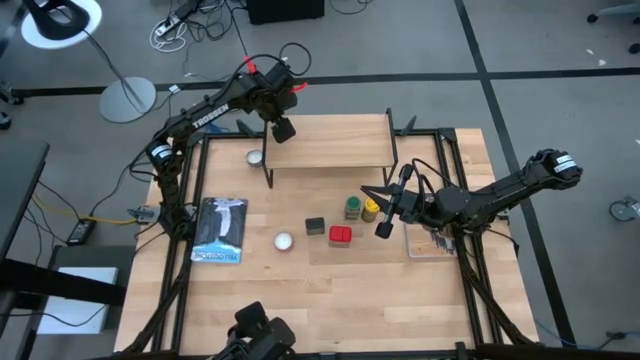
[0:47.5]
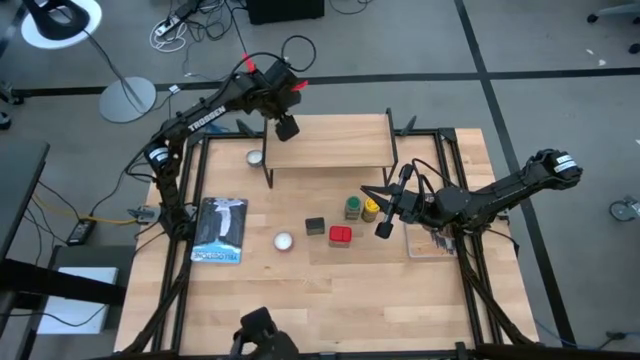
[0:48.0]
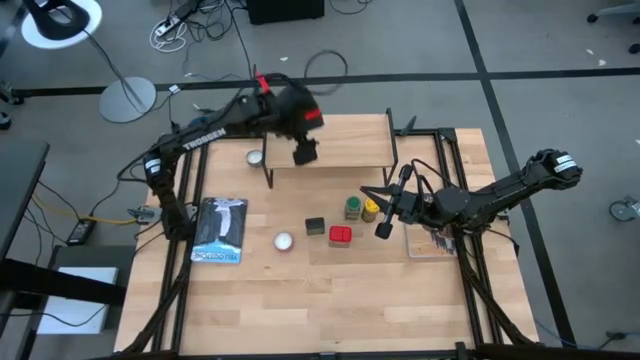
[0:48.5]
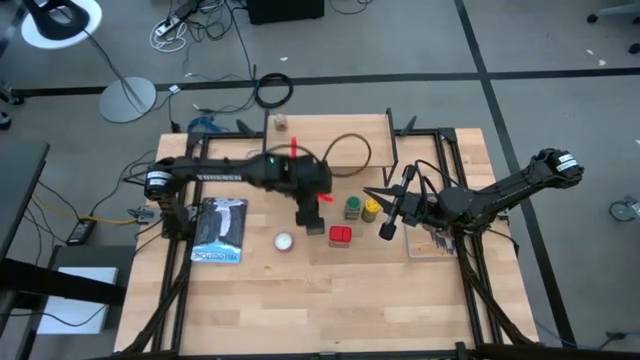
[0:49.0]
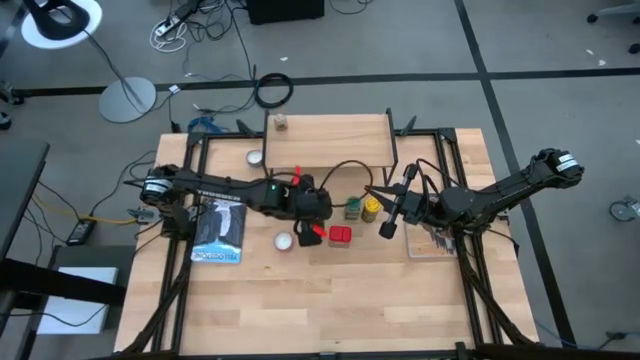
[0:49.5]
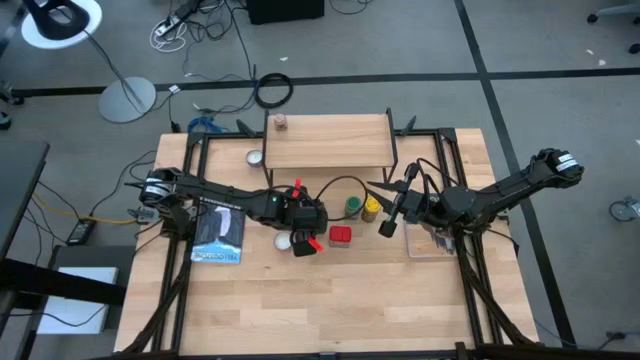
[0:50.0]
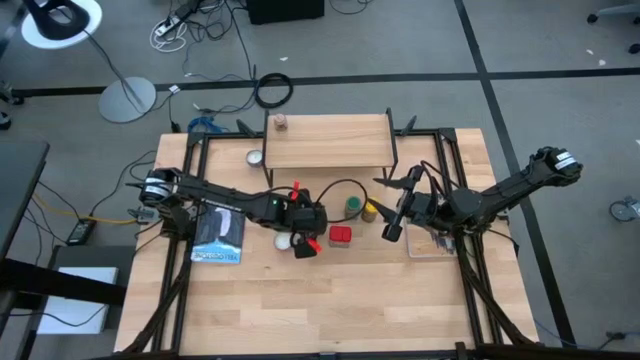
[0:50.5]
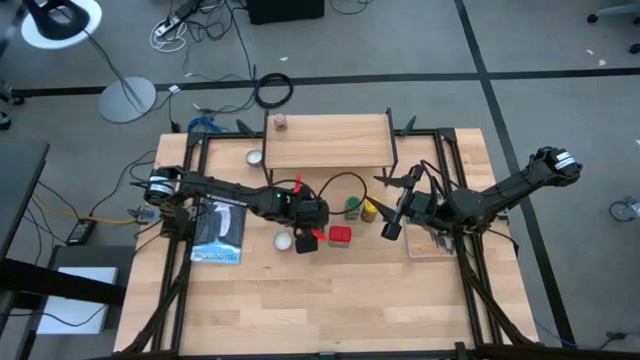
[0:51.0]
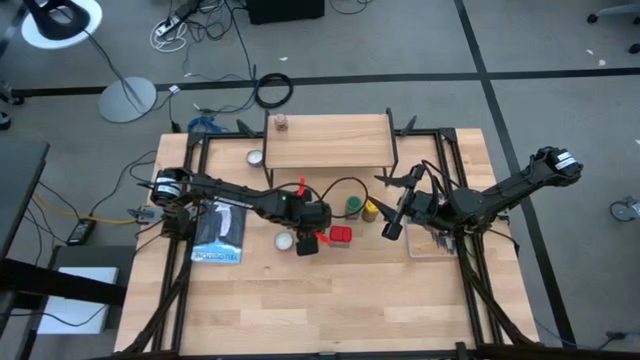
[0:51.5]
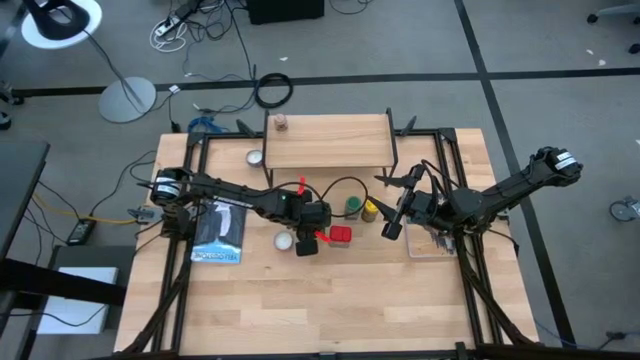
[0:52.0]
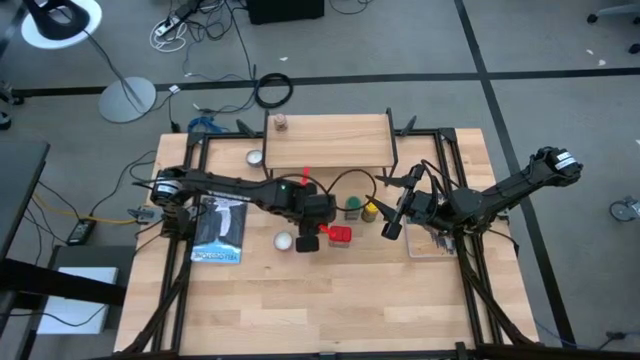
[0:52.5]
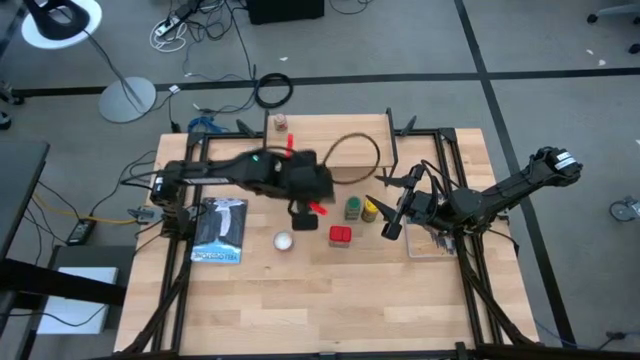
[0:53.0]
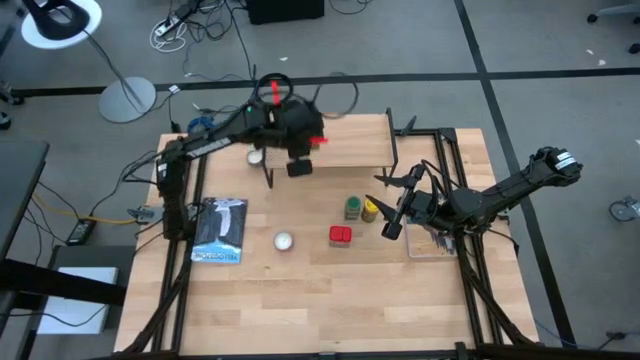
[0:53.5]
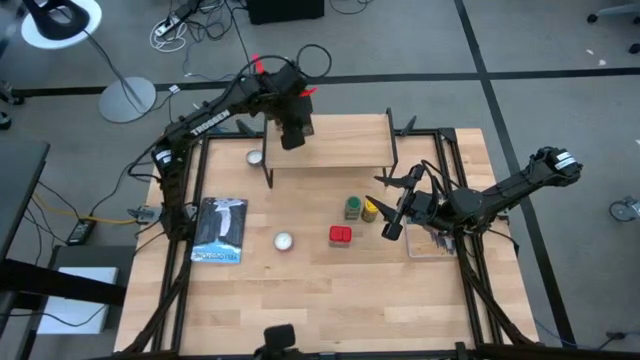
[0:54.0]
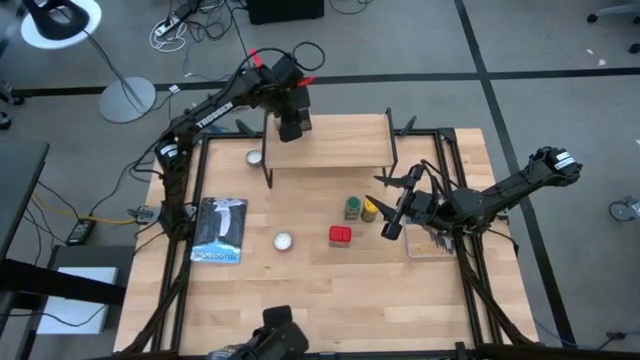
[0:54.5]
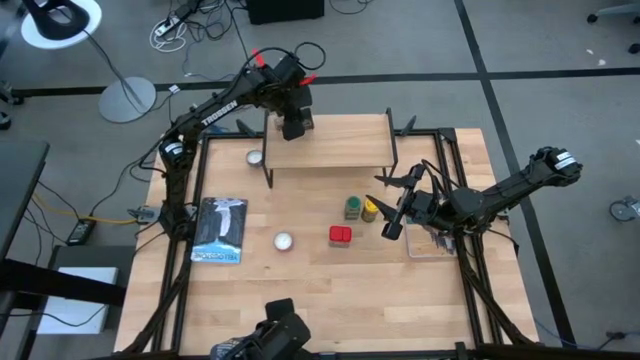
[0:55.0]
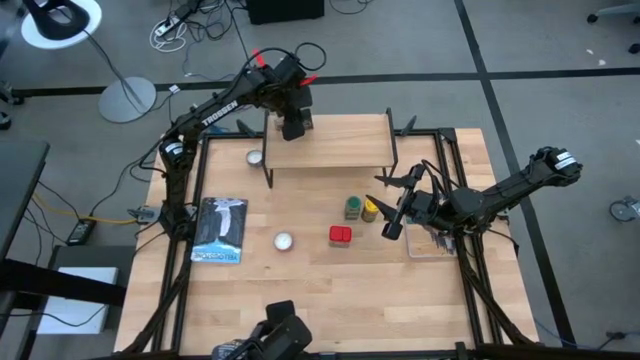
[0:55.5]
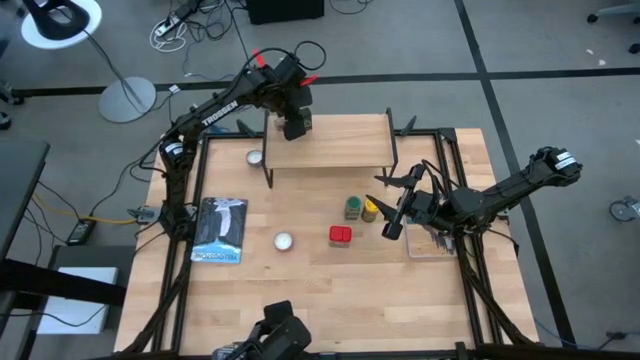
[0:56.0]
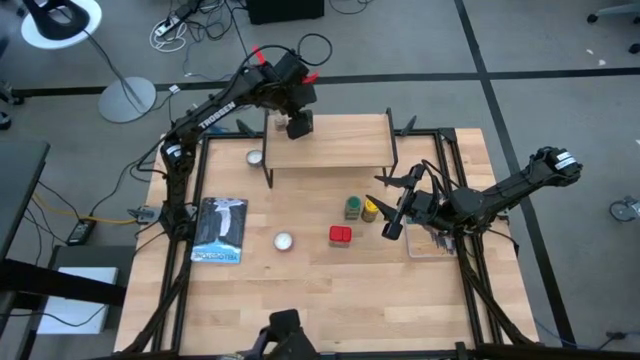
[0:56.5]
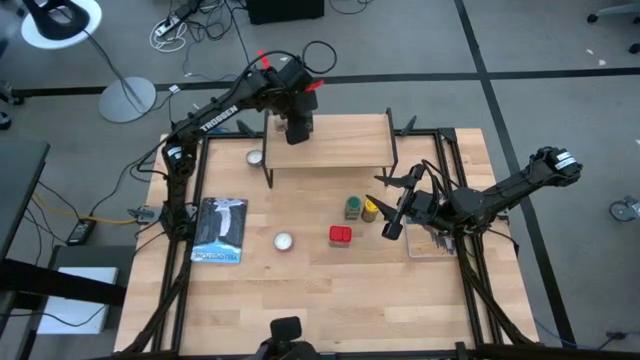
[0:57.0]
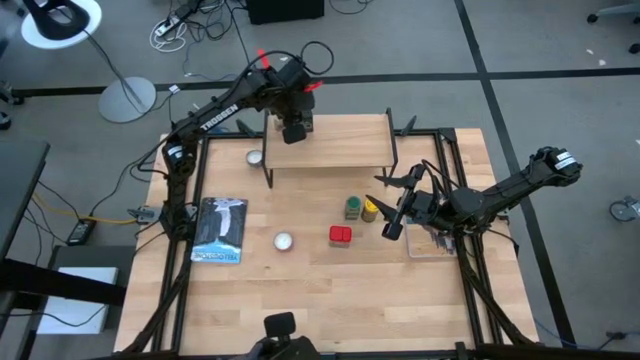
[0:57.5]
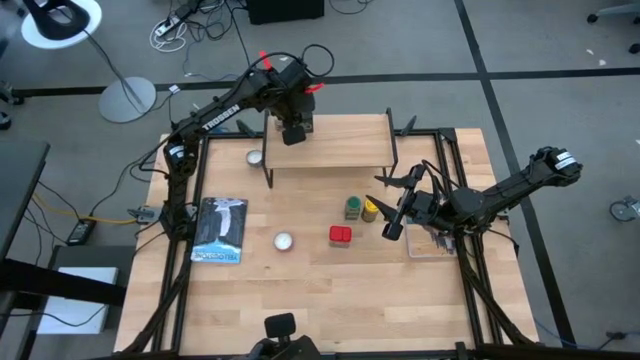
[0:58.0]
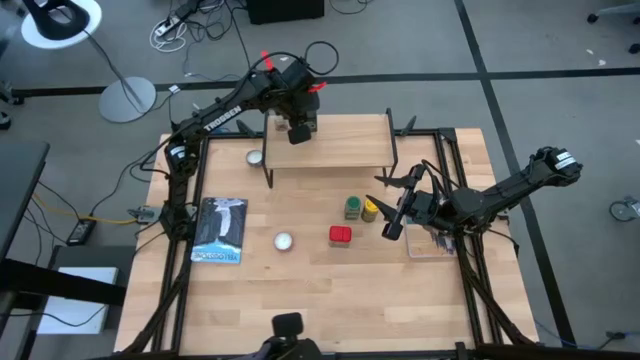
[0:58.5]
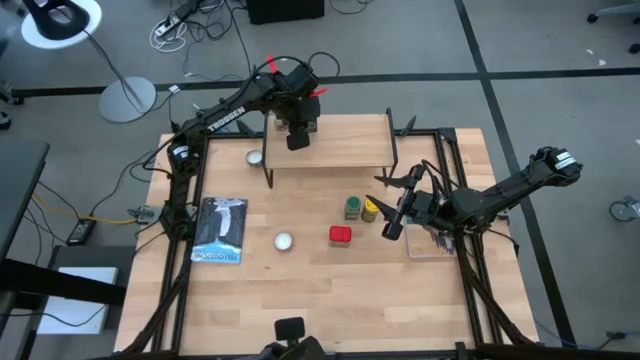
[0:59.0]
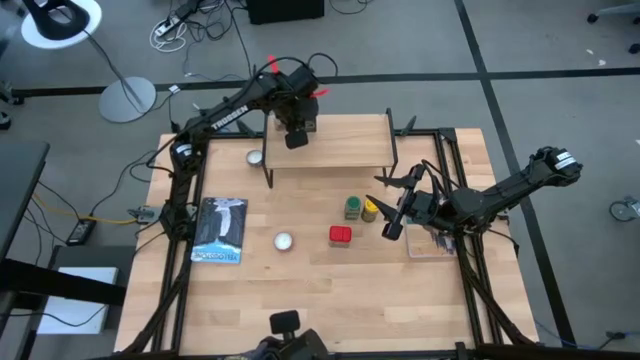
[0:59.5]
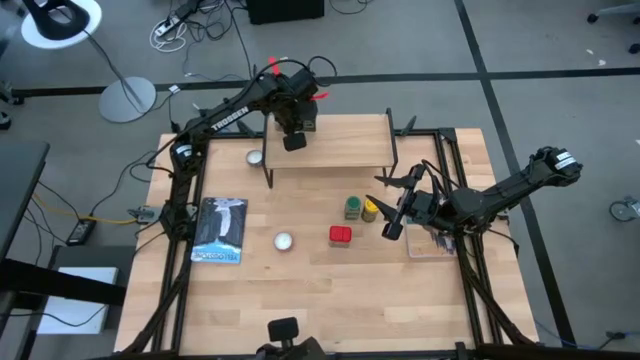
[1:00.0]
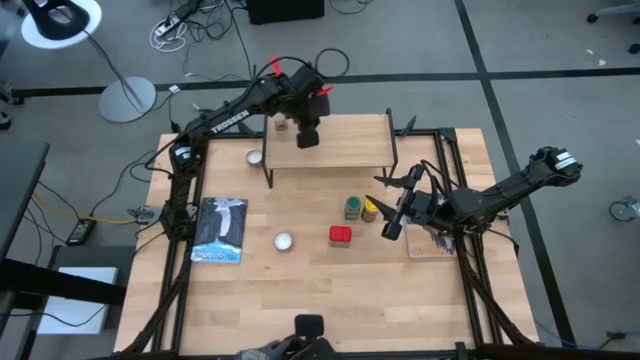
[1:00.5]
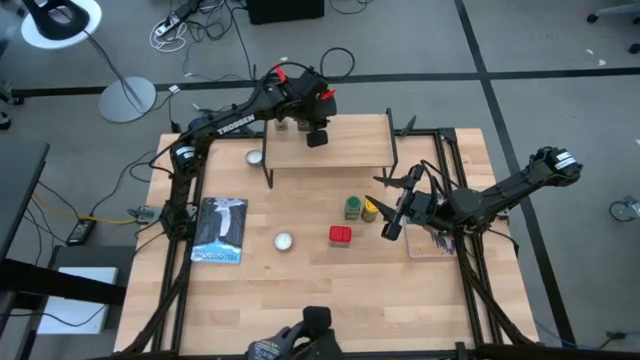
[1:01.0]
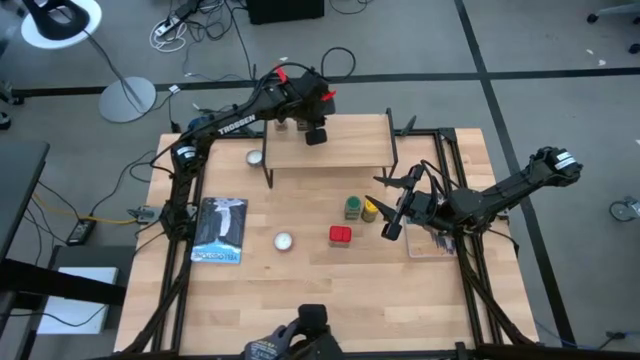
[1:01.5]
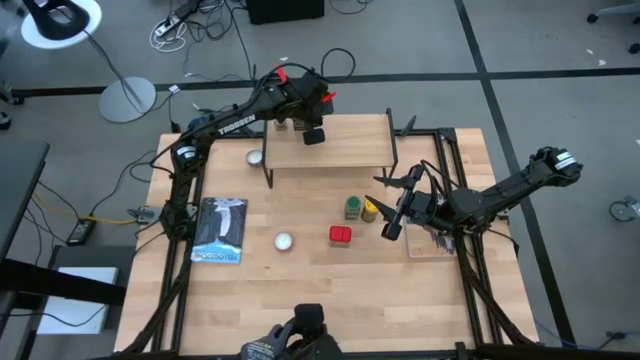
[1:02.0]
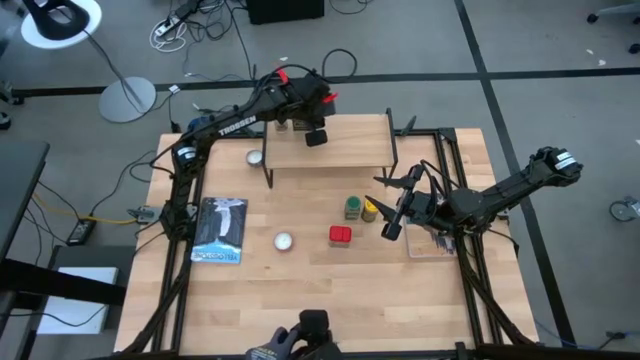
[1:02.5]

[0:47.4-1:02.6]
Task: Shelf spices
Put the black seasoning can on the shelf

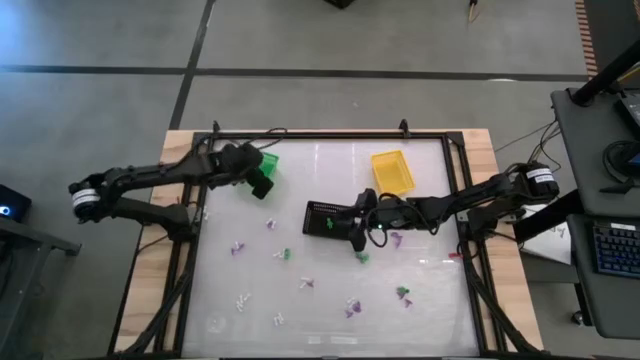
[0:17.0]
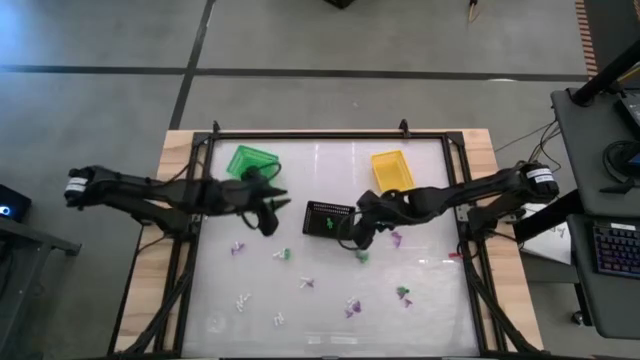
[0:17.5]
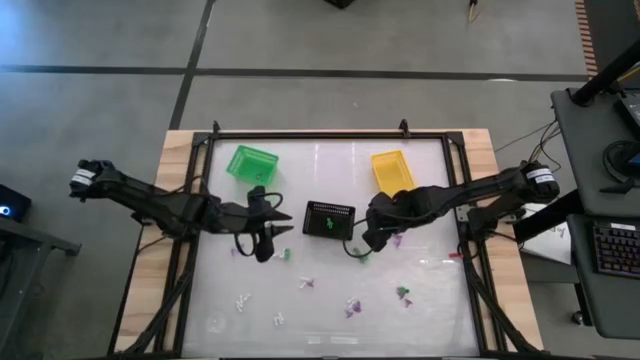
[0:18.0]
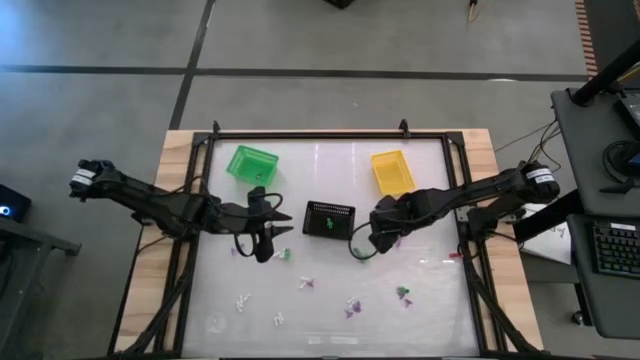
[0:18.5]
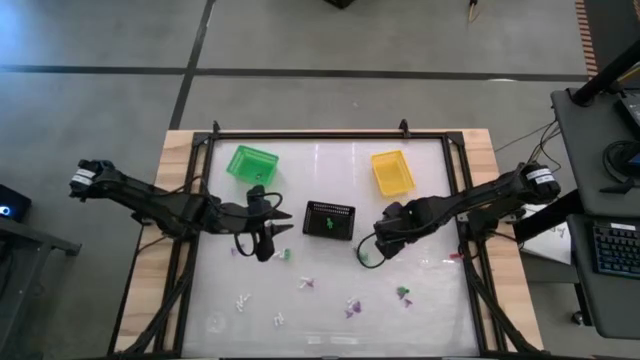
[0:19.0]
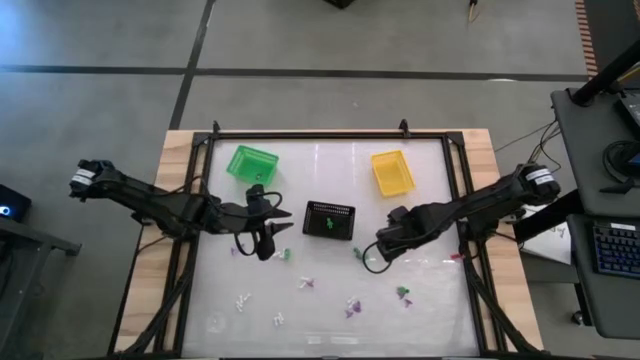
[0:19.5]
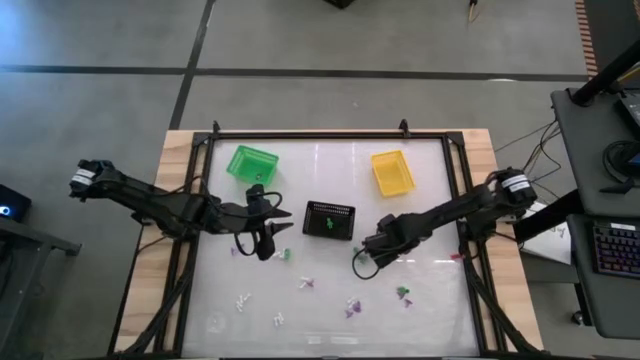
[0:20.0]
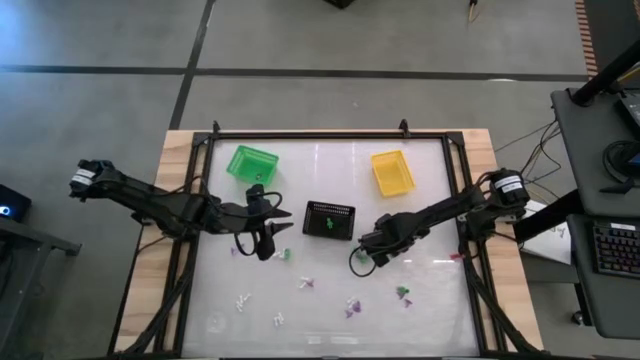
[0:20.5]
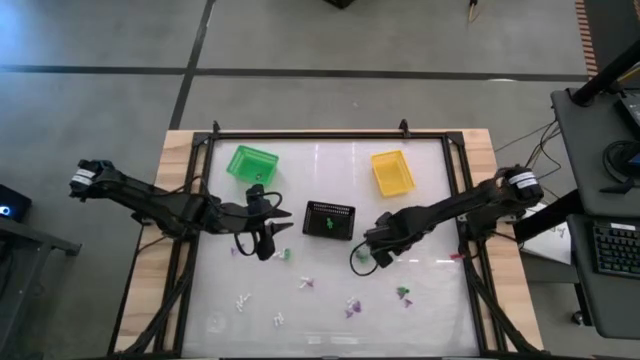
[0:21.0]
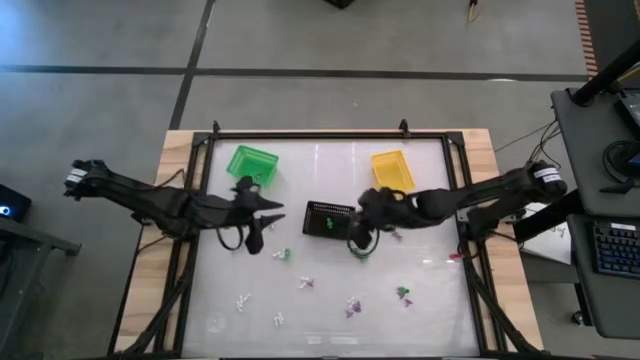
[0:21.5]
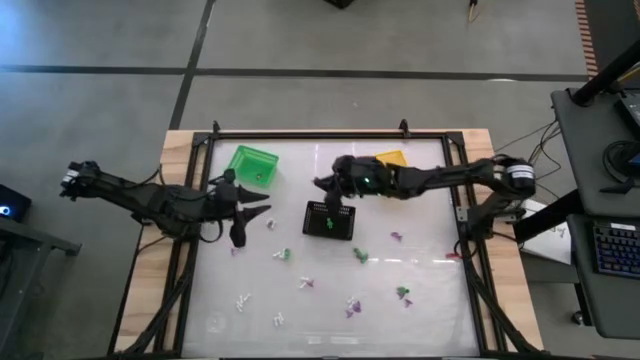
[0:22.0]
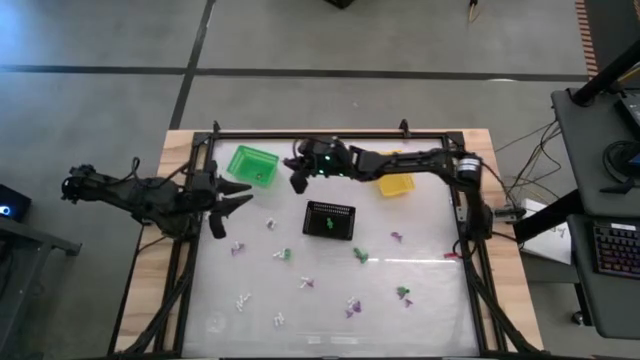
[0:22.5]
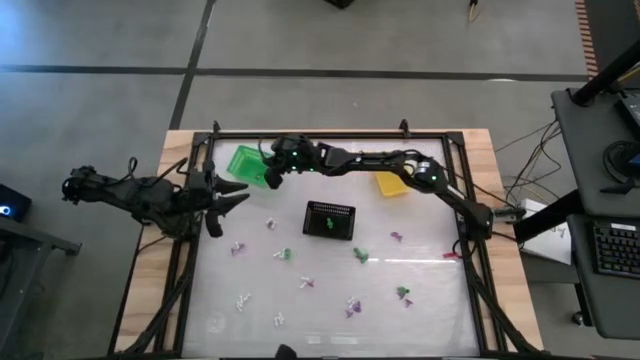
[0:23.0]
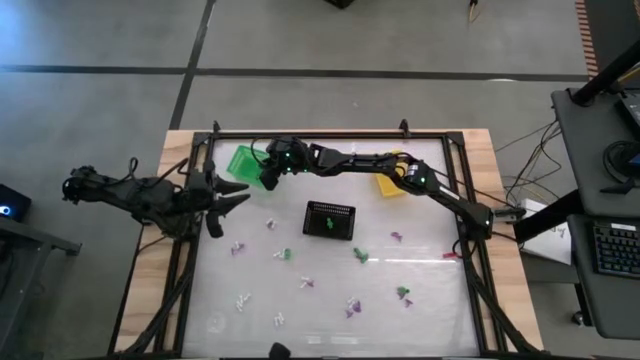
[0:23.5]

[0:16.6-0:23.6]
Task: Sort Halloween decoration
Put the purple witch hat toy into the green bin
